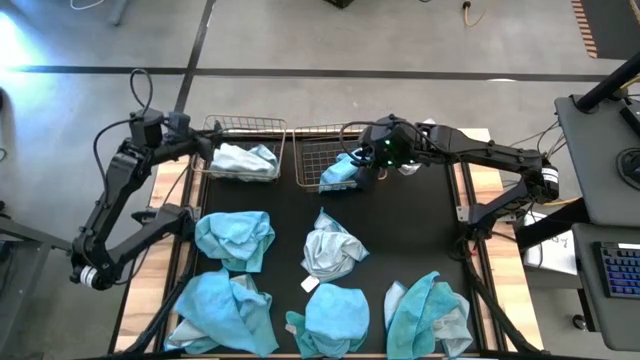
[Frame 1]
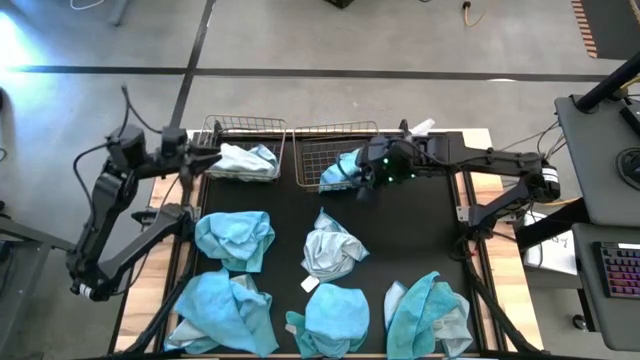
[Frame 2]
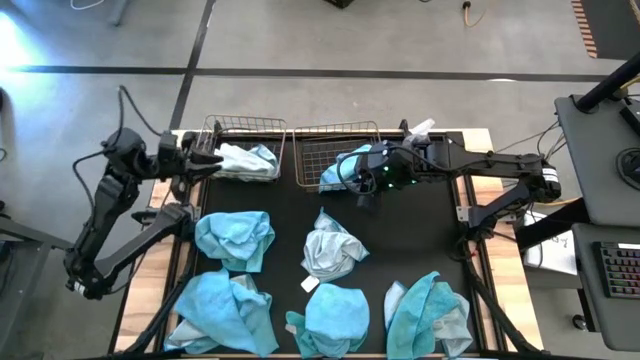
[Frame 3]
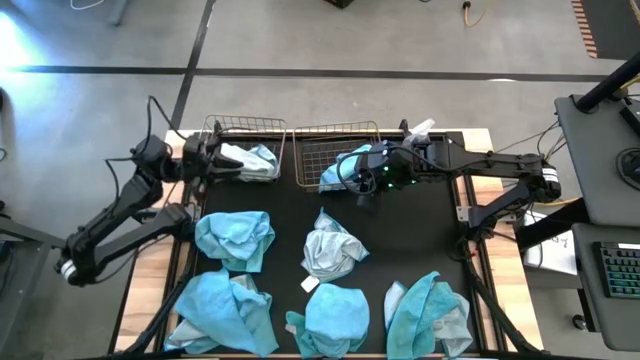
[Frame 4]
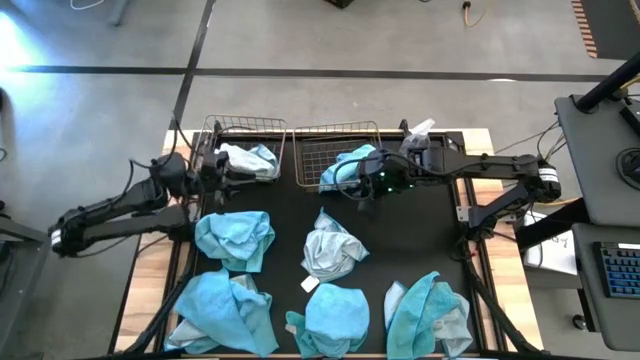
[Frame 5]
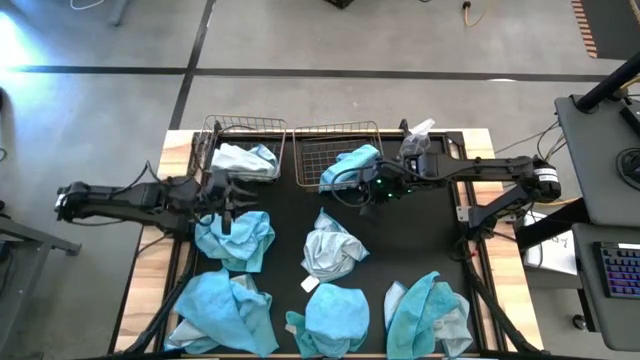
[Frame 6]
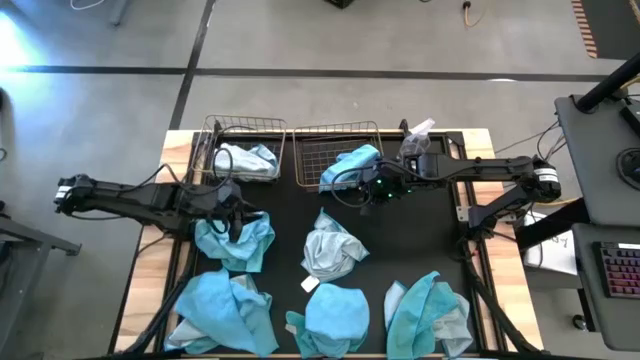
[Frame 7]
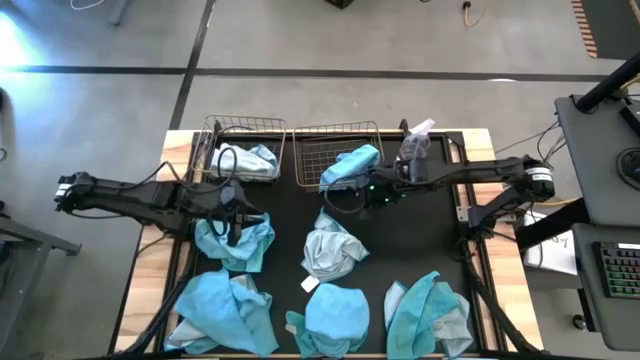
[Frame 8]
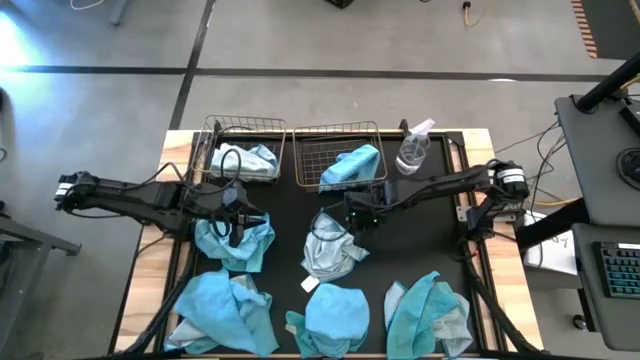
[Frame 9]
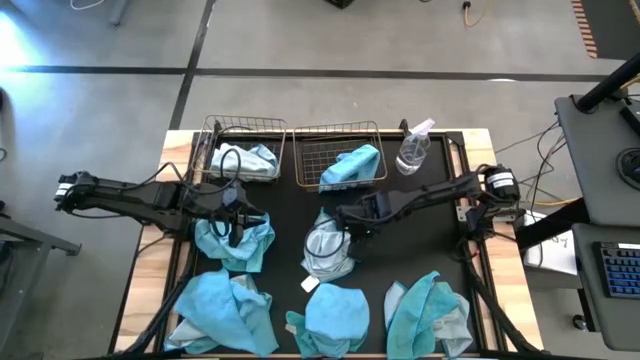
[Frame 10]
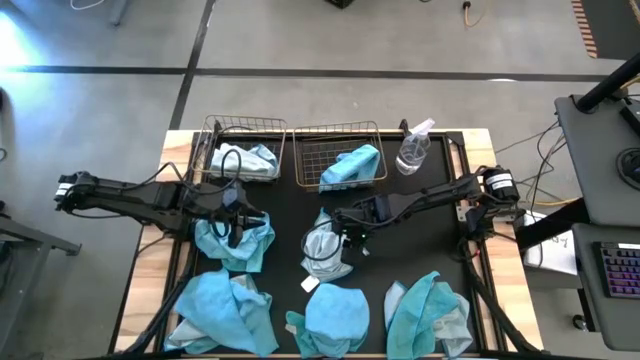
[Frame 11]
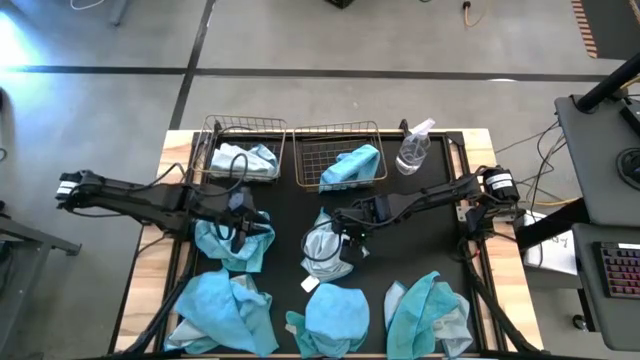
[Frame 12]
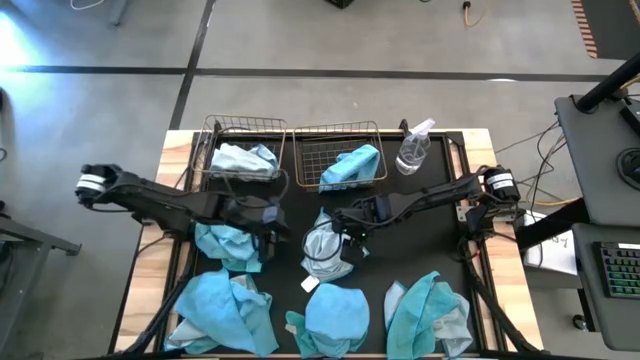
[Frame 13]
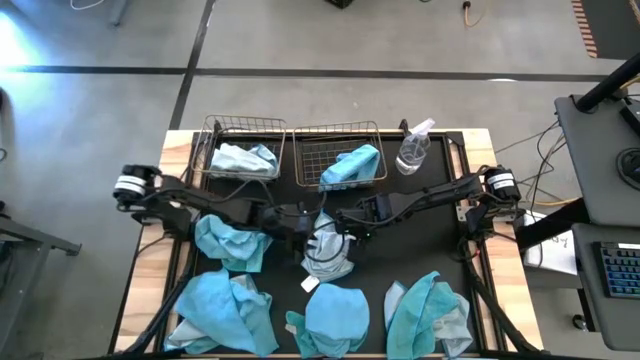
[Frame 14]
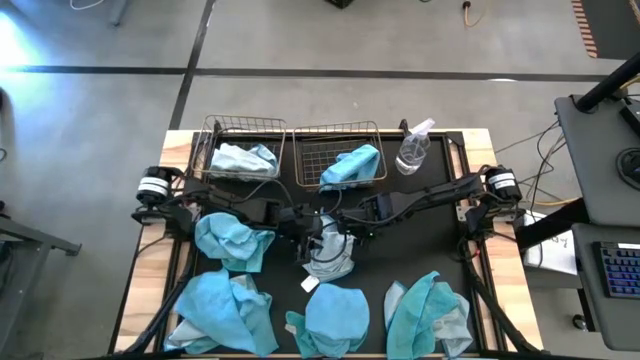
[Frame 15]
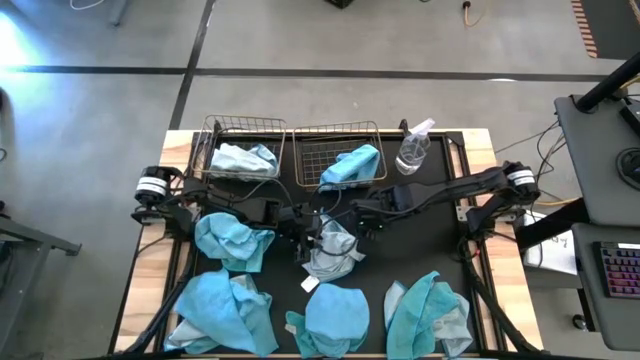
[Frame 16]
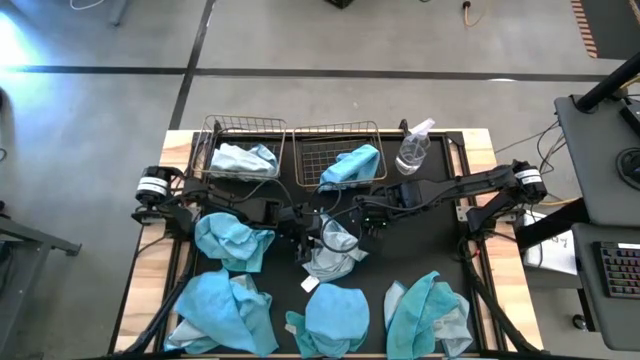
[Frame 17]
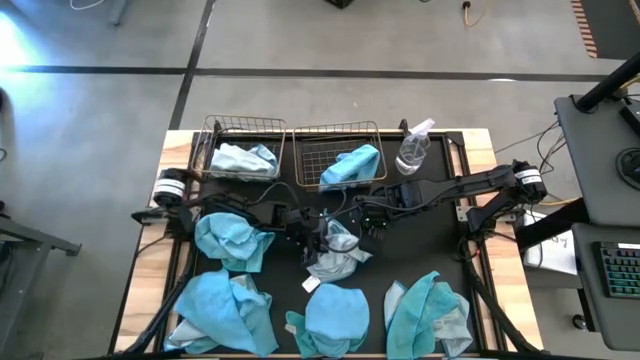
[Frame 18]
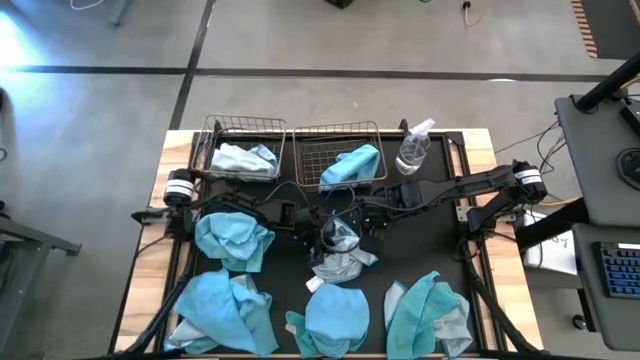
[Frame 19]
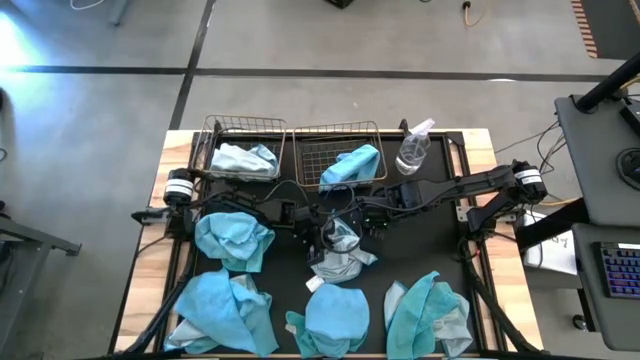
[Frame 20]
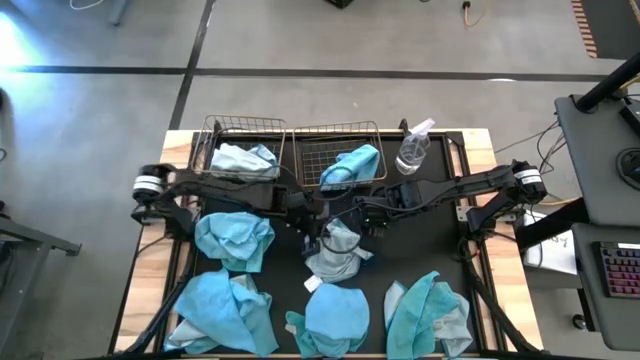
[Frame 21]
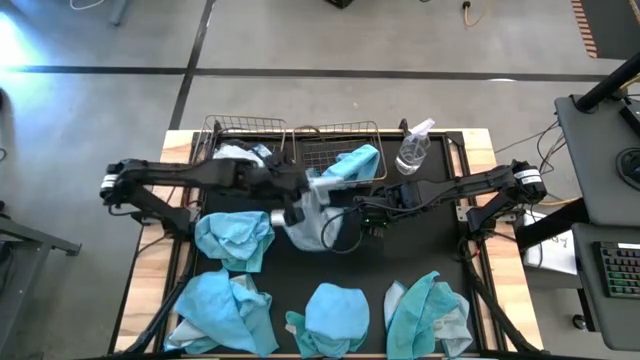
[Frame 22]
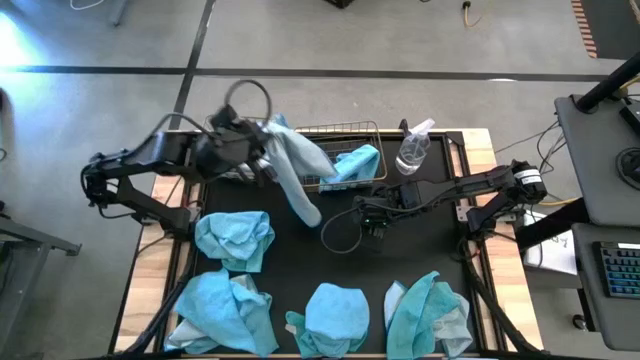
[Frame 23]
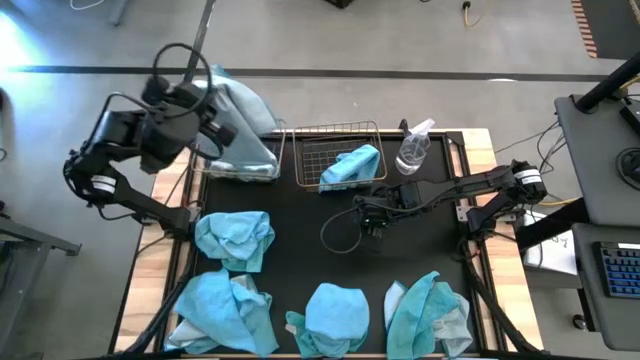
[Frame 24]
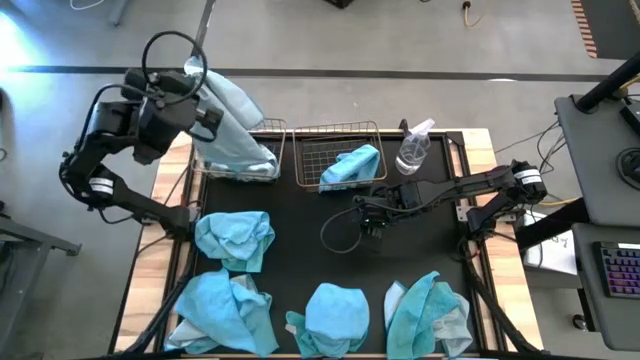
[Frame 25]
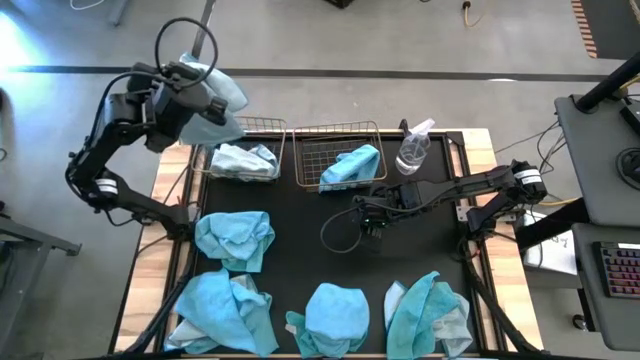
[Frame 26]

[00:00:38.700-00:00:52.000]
Task: Sort microfiber towel by color & place in baskets
Put the light-blue microfiber towel into the left wire basket

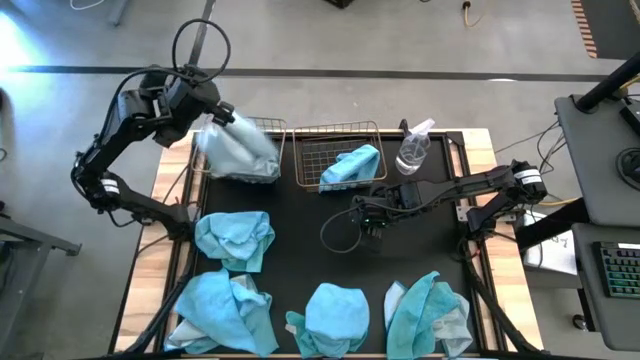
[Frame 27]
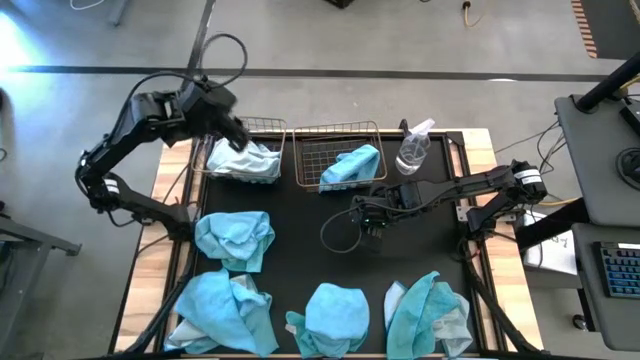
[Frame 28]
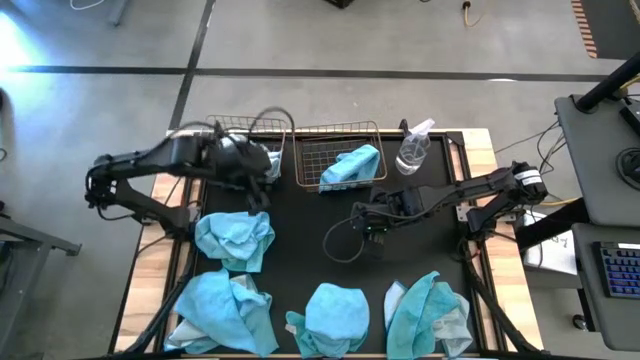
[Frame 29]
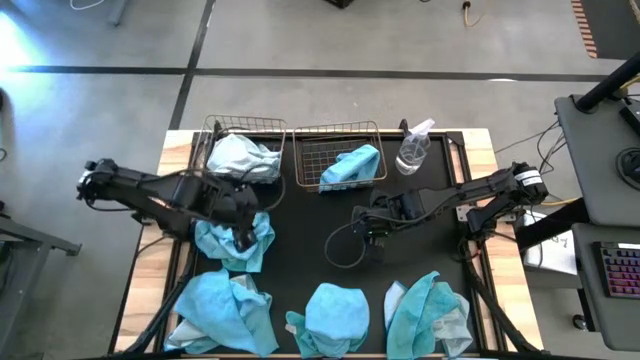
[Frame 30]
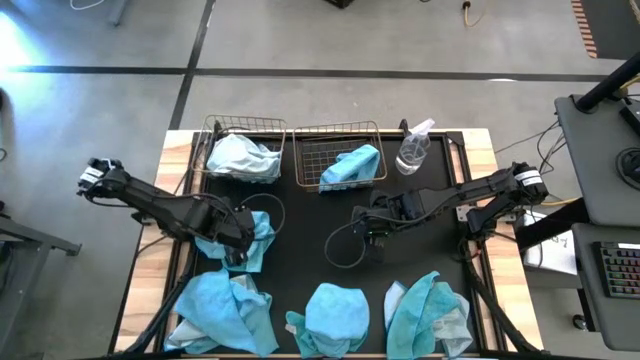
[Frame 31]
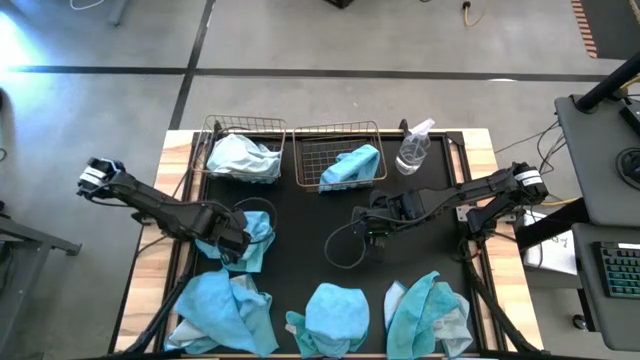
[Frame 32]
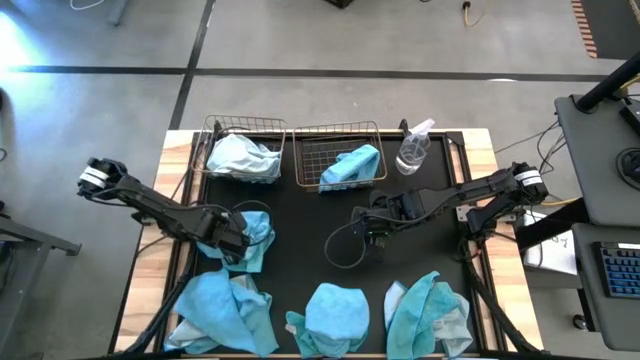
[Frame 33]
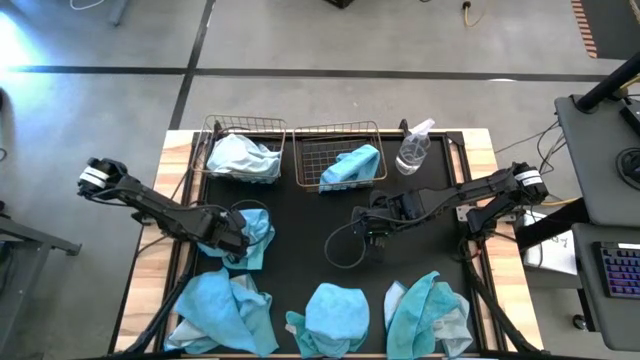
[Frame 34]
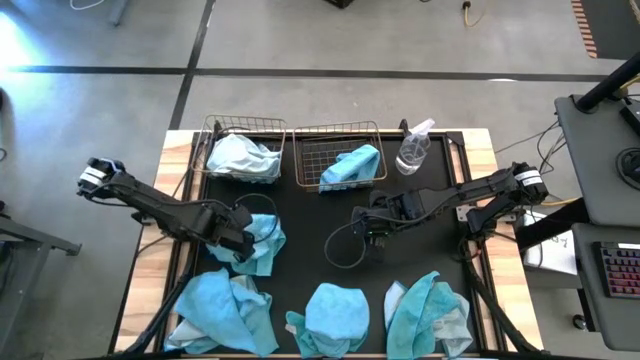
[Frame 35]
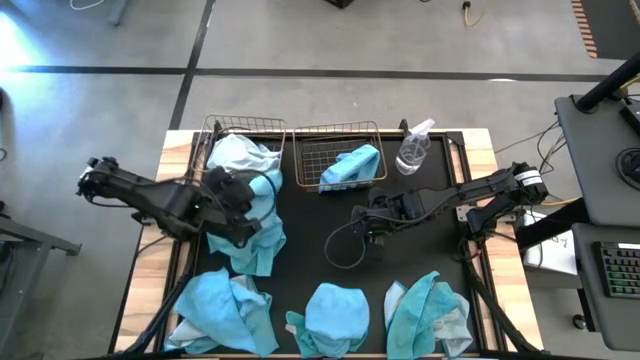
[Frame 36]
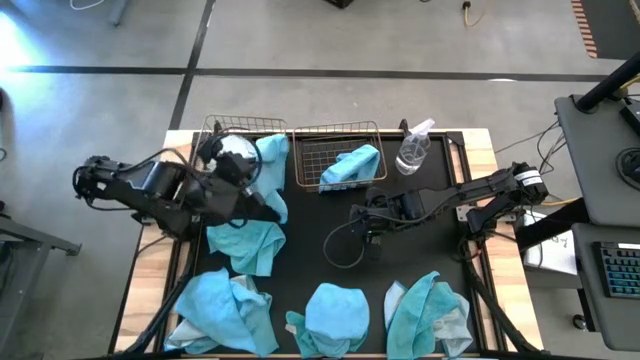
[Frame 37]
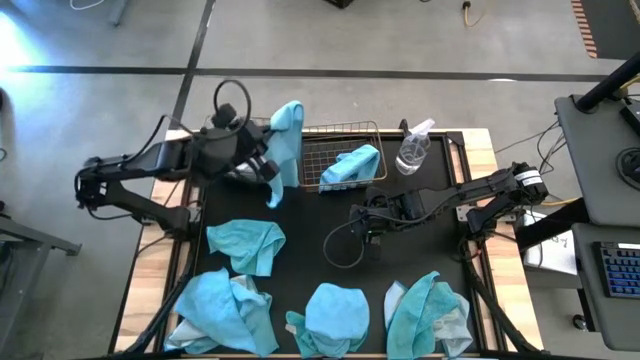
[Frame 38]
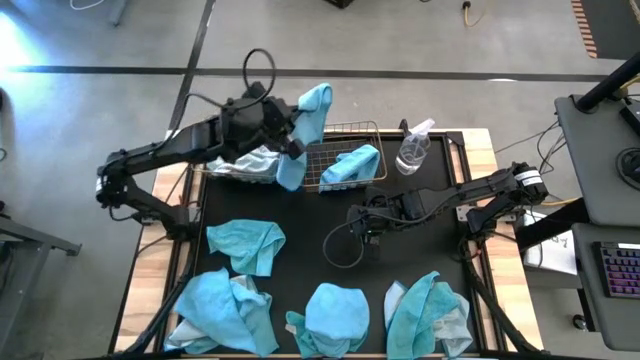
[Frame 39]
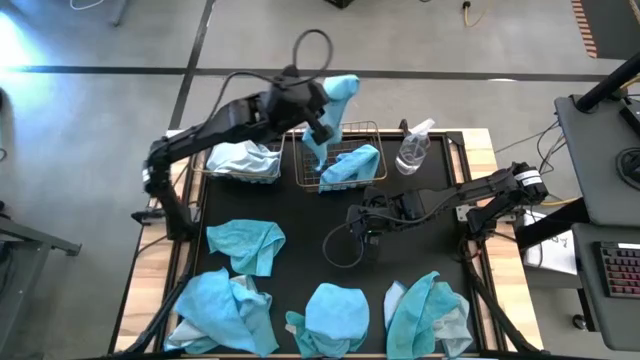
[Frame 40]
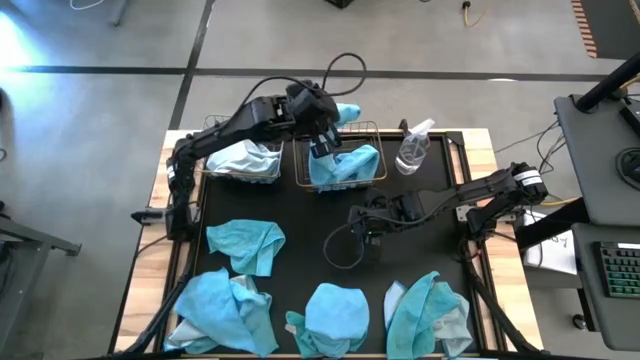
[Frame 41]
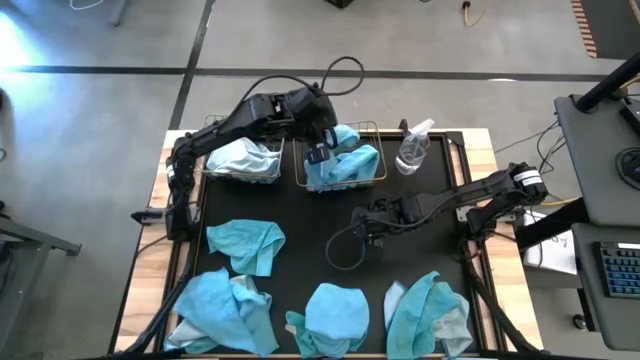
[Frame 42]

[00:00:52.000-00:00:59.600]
Put the blue microfiber towel into the right wire basket

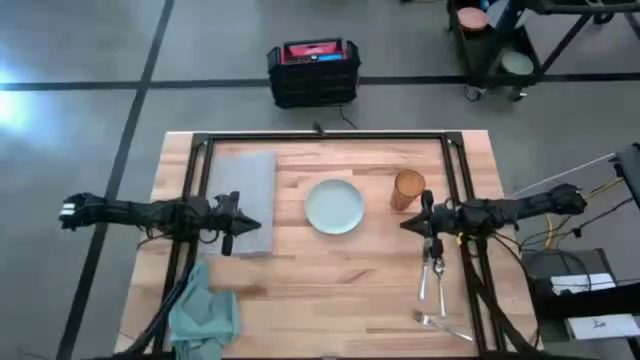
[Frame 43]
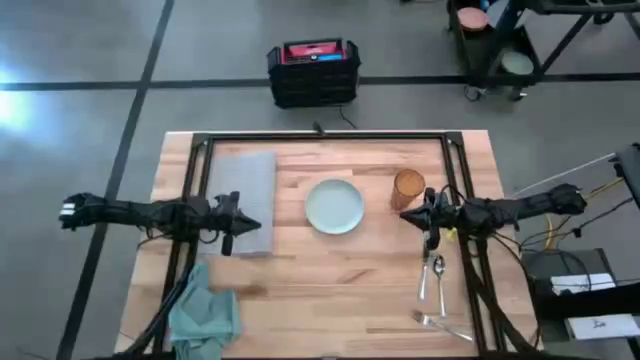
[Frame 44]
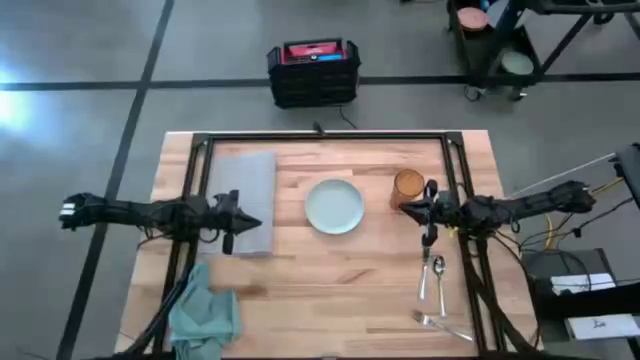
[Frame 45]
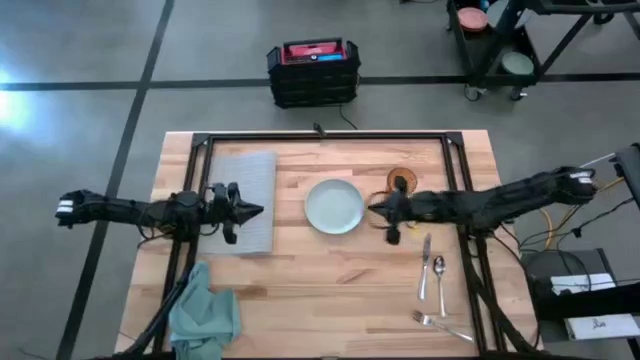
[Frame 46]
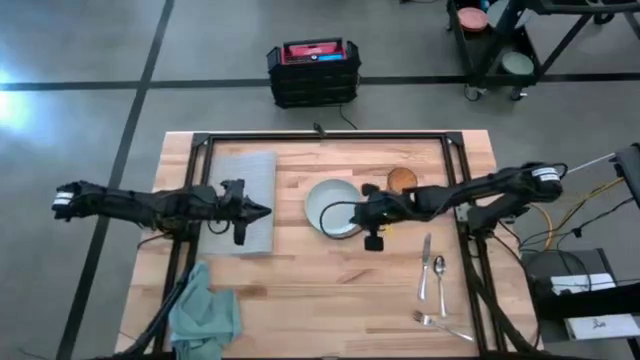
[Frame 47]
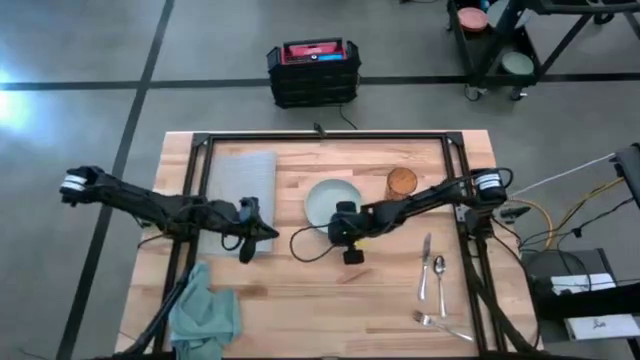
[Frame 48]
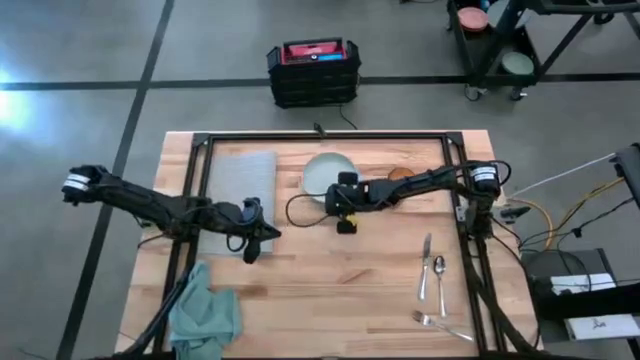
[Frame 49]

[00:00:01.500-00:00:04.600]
Task: Set table place
Adjust the plate
